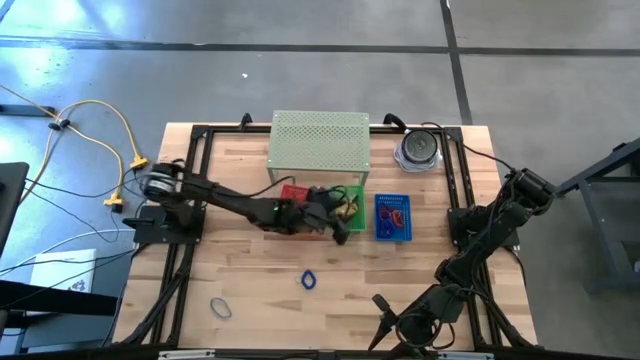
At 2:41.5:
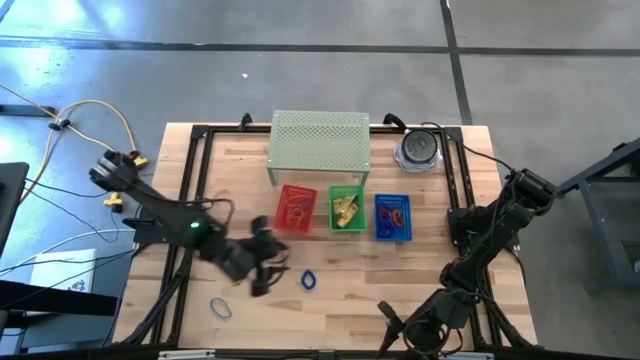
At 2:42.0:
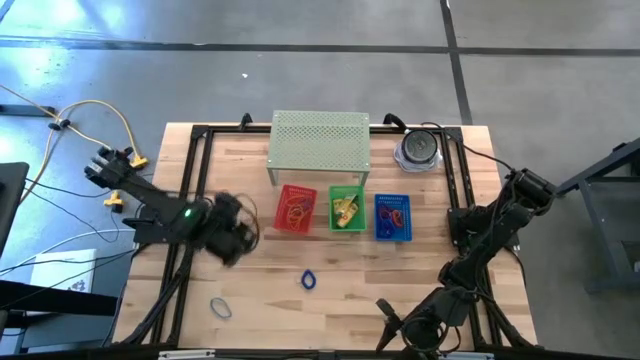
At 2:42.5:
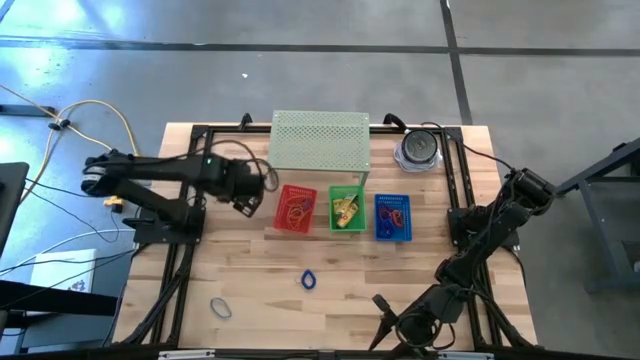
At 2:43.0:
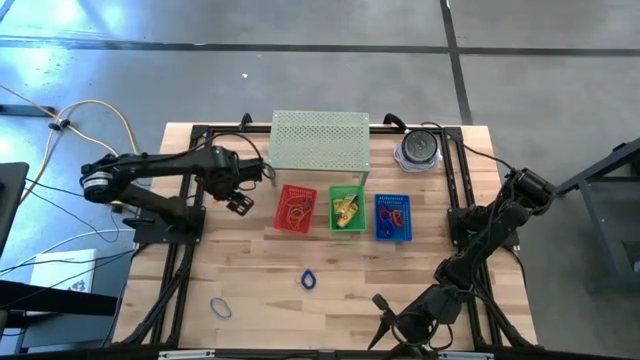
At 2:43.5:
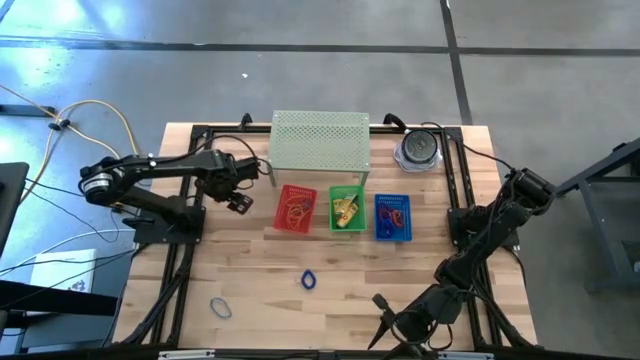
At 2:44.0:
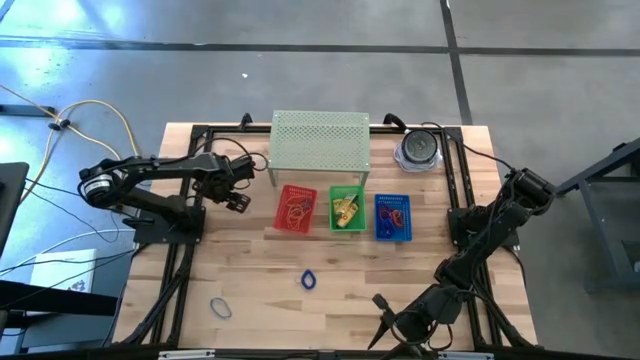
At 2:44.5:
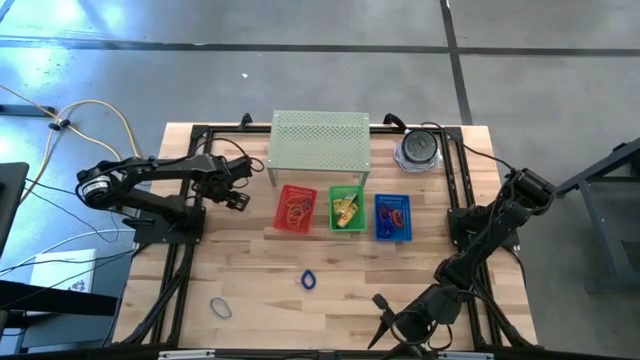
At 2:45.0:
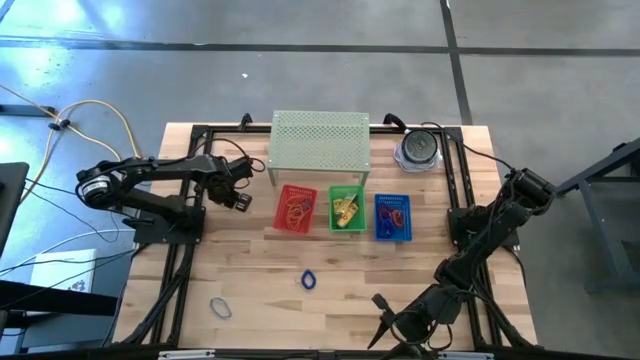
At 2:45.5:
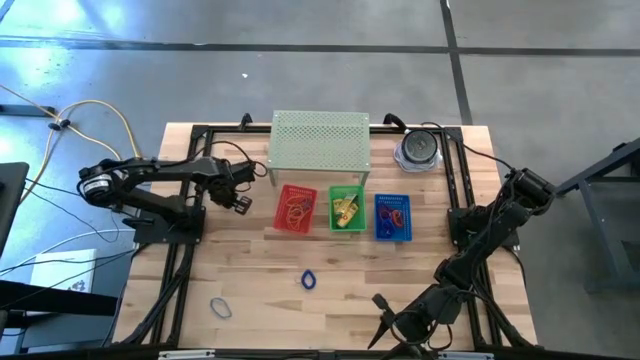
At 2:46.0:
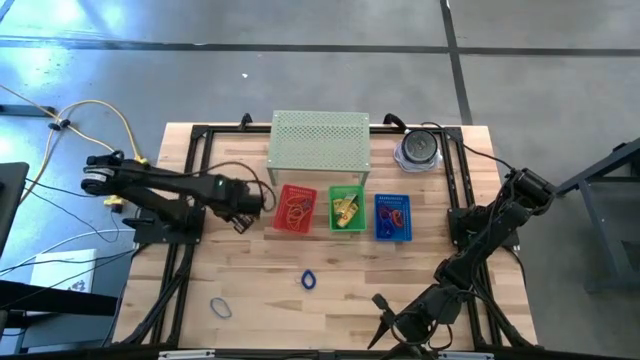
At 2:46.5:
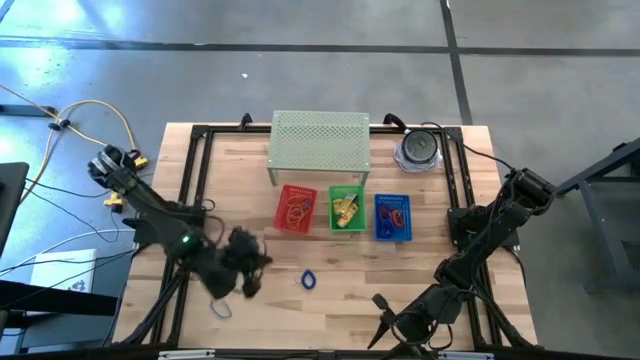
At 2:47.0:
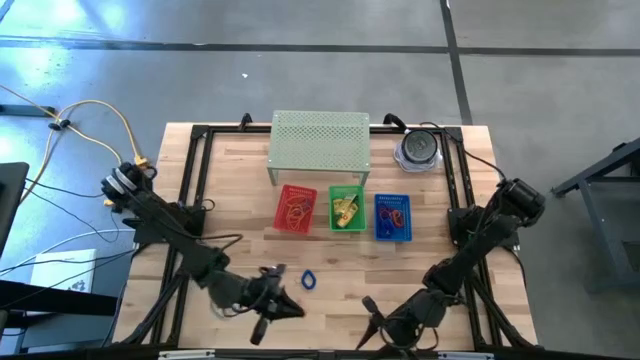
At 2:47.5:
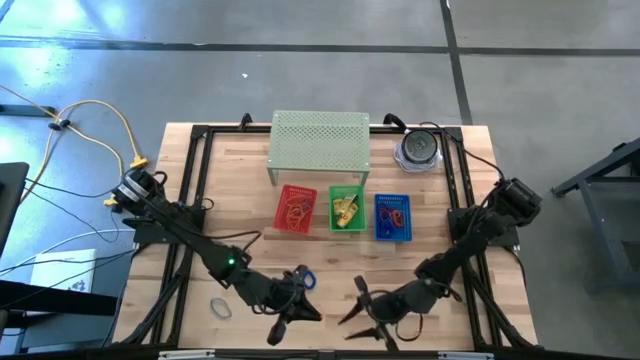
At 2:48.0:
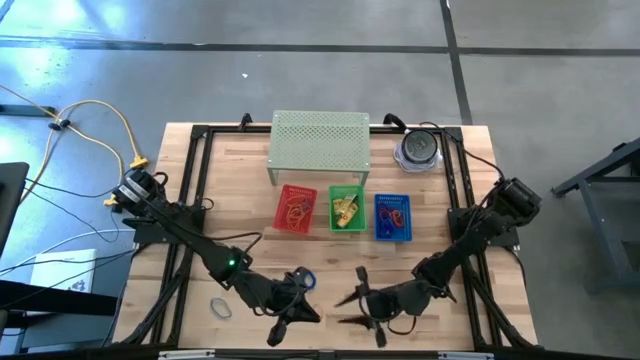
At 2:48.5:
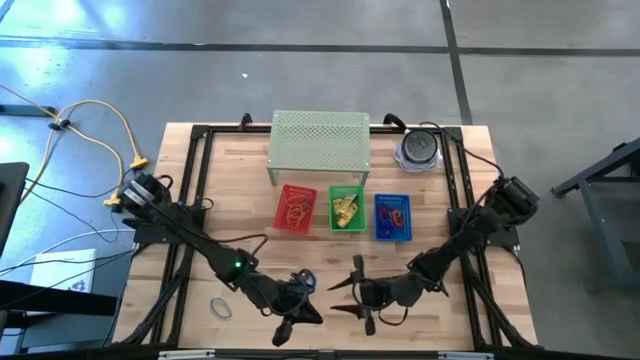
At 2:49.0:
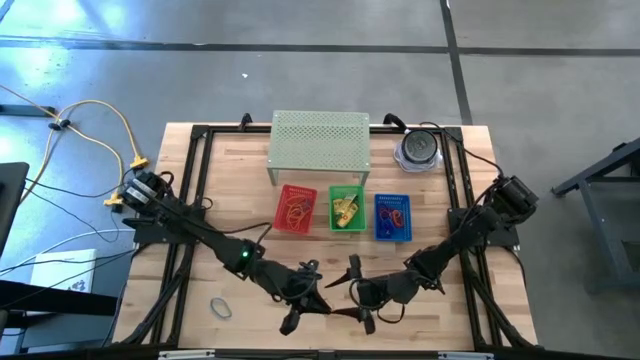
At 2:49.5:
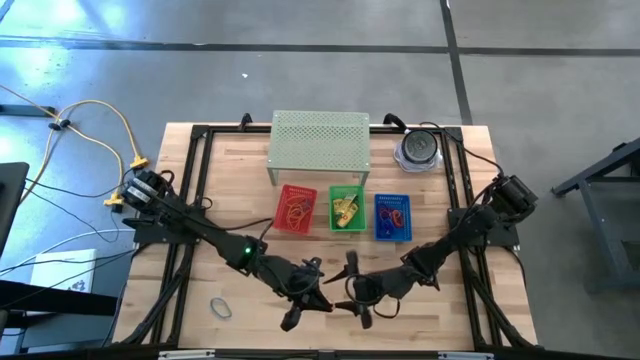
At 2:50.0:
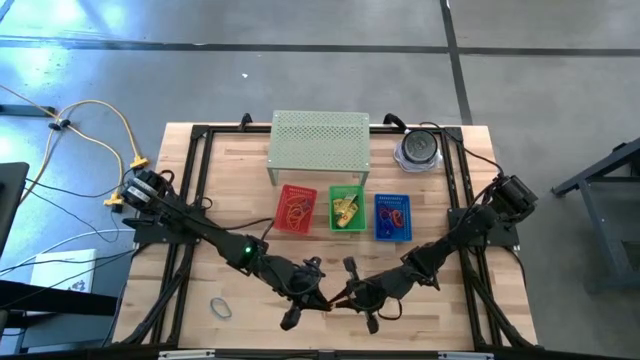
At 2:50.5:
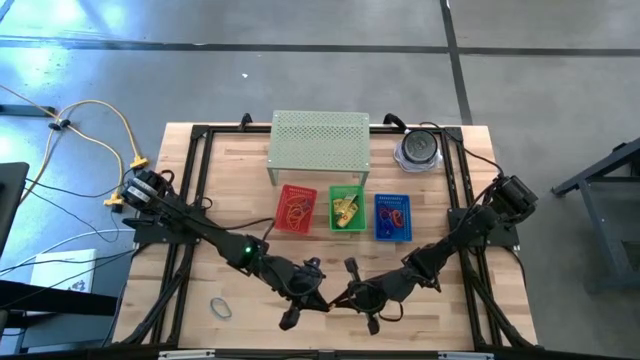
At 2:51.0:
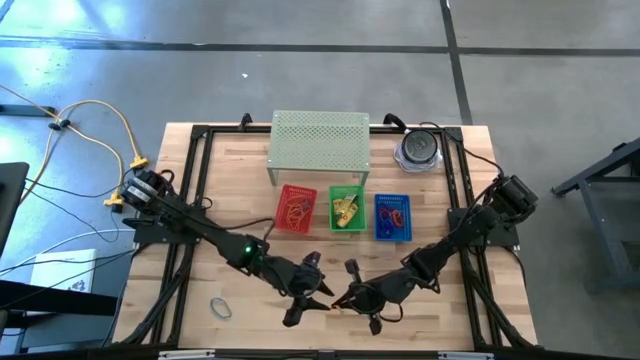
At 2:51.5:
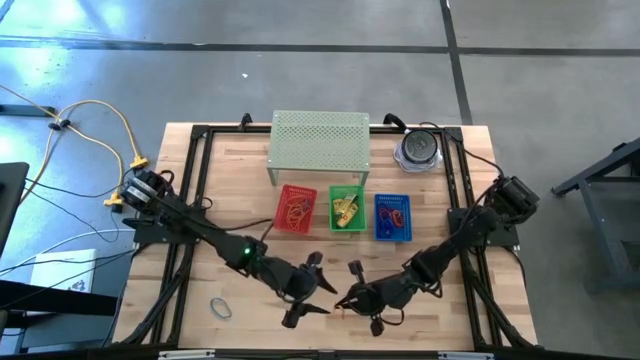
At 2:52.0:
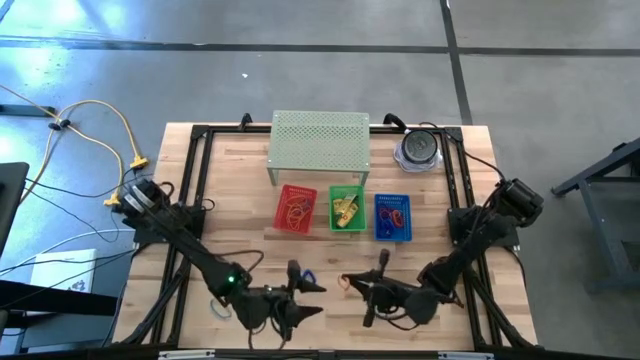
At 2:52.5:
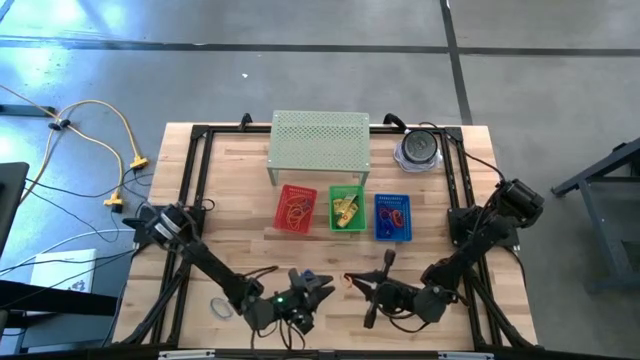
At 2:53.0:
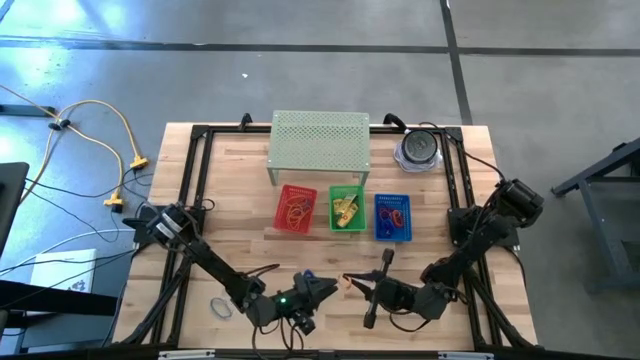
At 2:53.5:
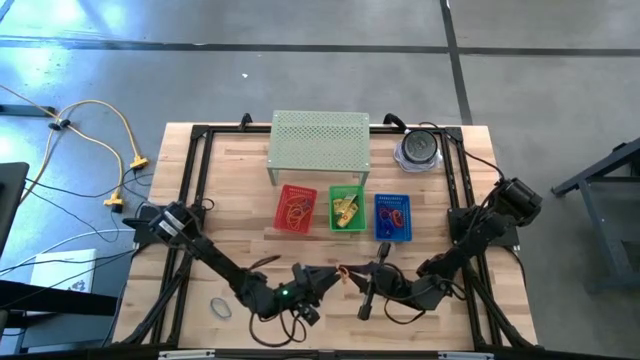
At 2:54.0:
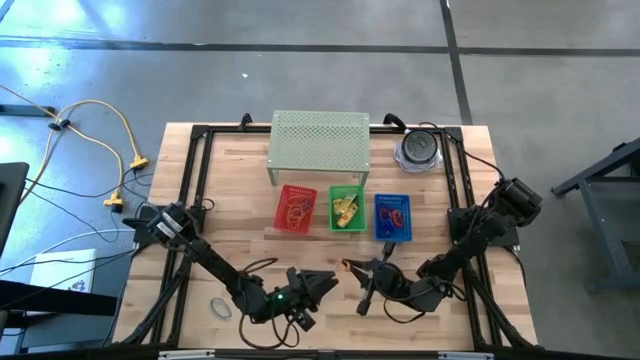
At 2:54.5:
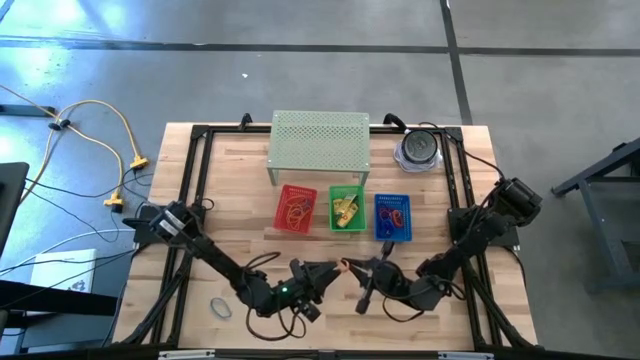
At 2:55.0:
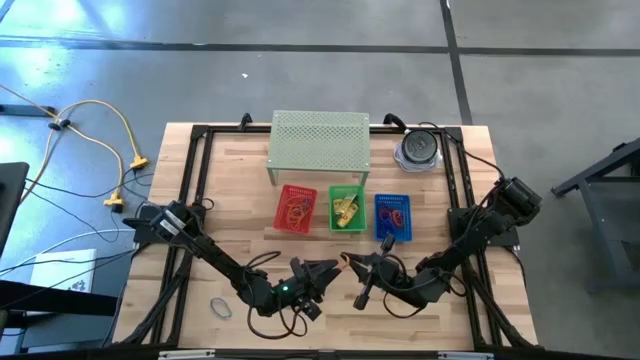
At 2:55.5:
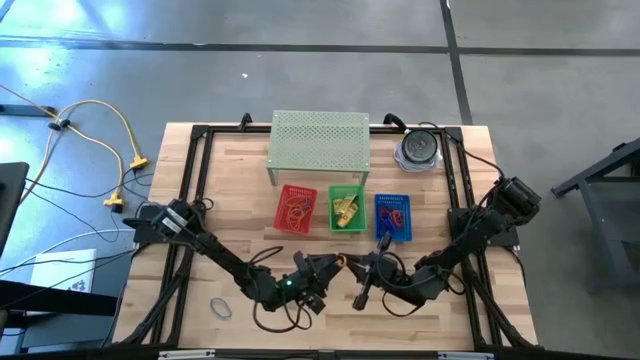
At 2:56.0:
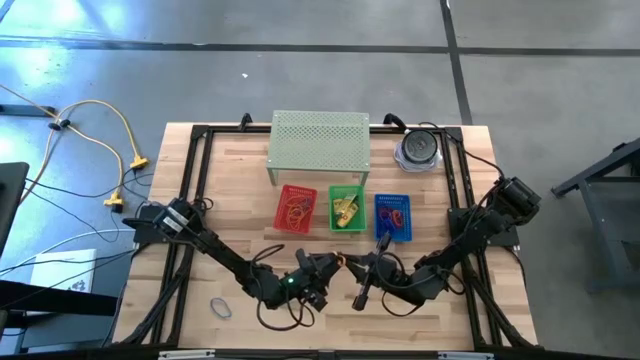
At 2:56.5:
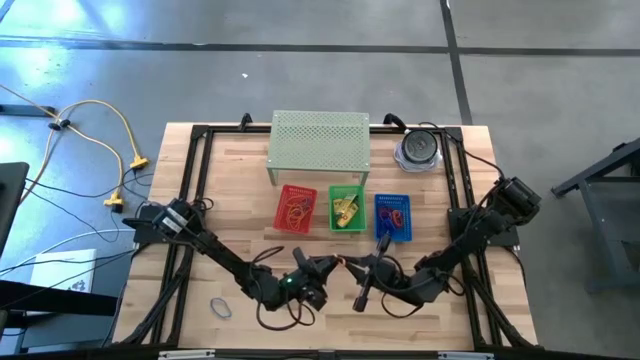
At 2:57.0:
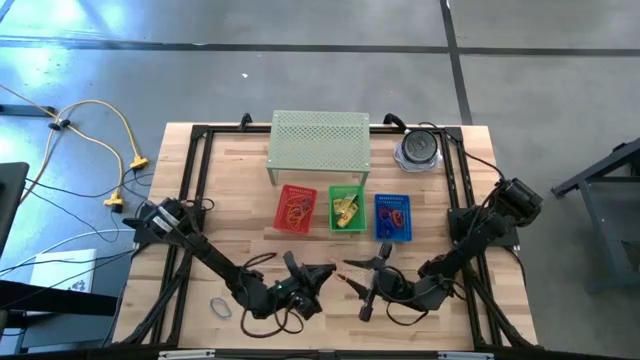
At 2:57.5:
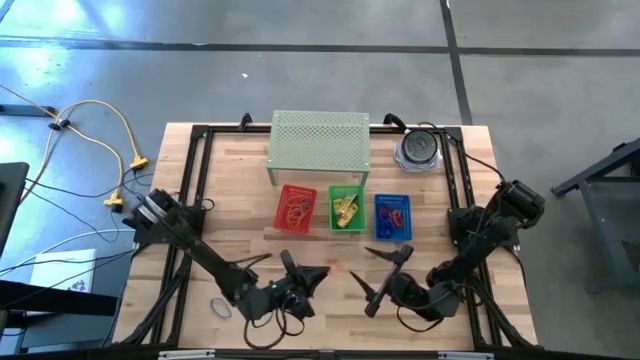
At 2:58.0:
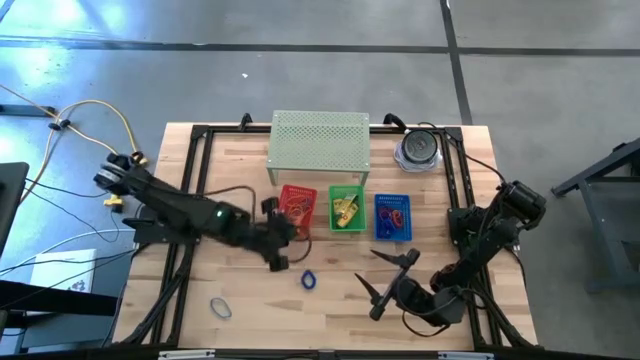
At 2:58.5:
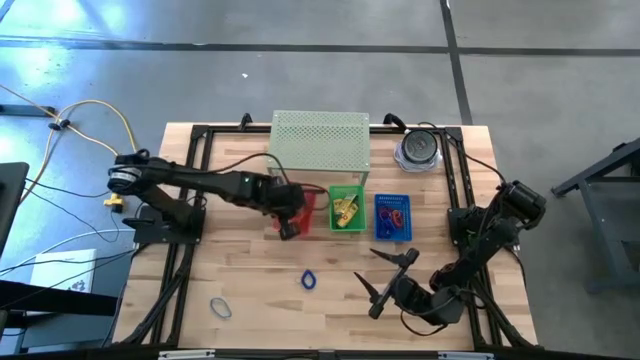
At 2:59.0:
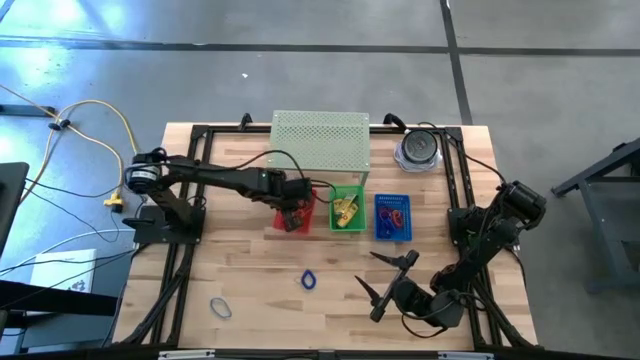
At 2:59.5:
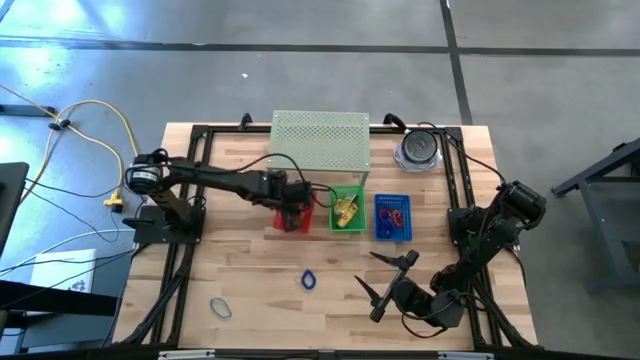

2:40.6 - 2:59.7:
Task: Pick & Place Office Desk Supplies
Put the orange rubber band into the red bin

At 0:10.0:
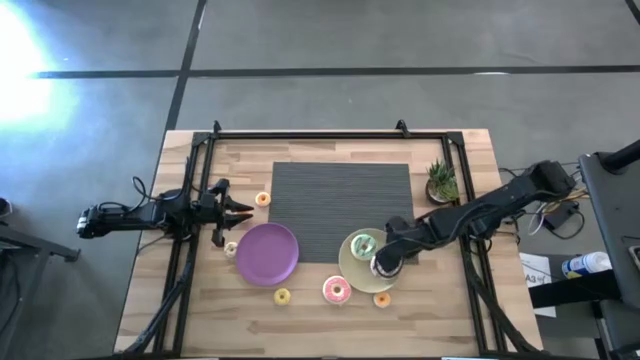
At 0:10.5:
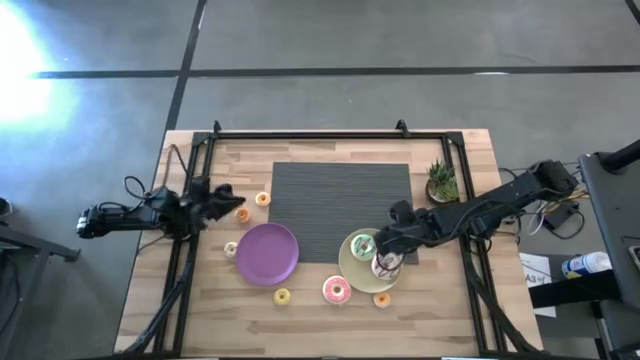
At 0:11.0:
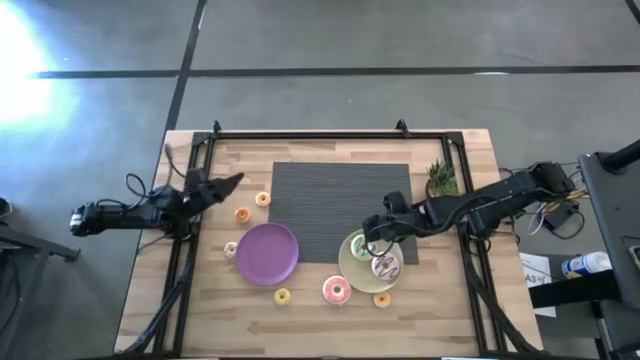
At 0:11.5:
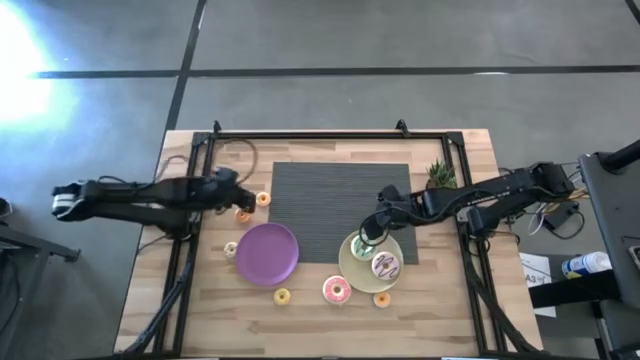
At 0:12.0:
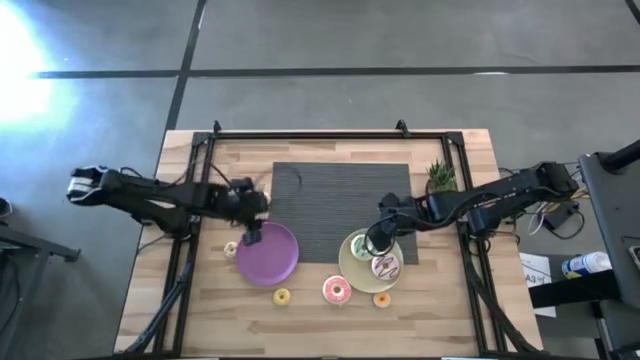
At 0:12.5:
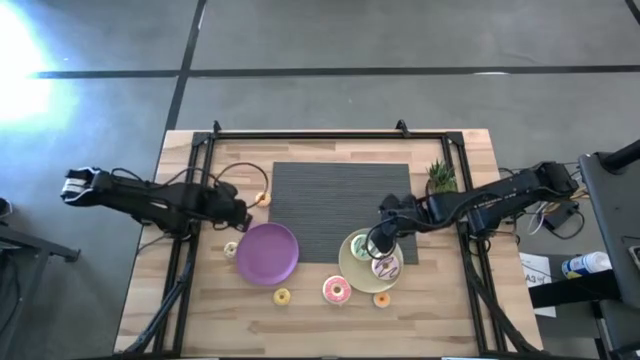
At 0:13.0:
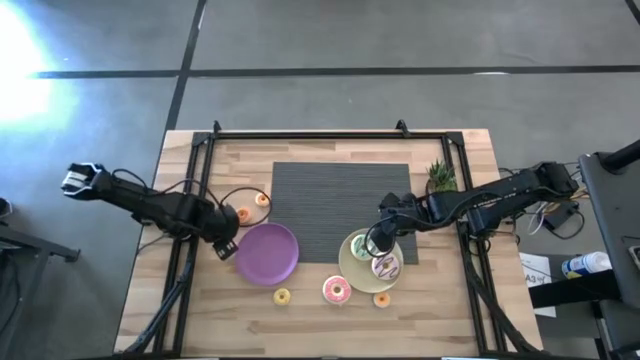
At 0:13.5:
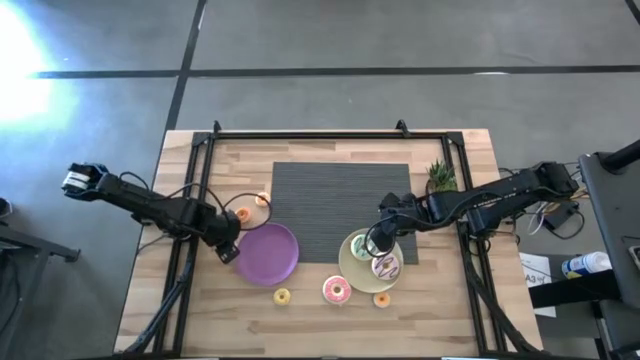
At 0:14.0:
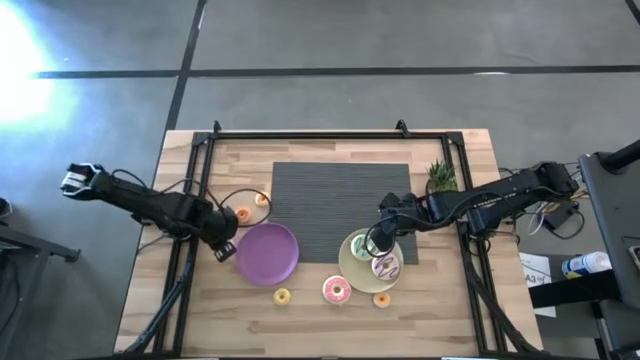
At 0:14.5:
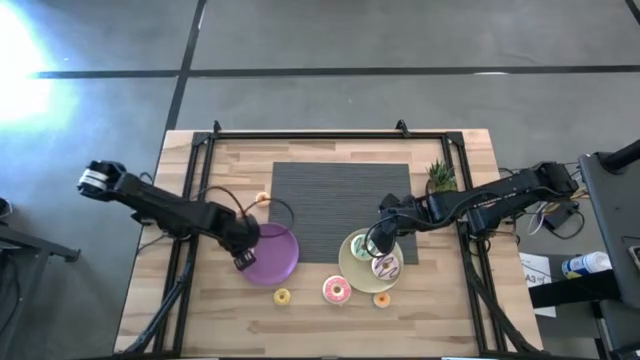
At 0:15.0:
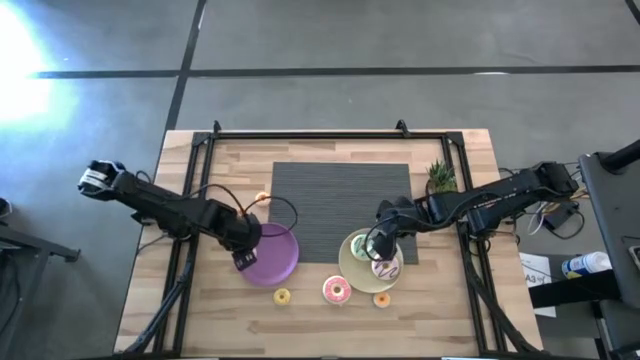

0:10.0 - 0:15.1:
Task: Pick & Place donuts
Put the small white donut on the violet plate
